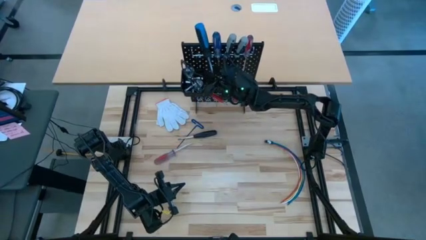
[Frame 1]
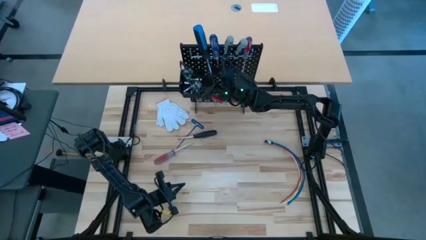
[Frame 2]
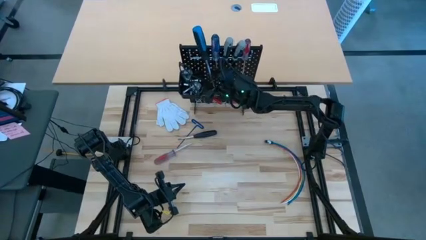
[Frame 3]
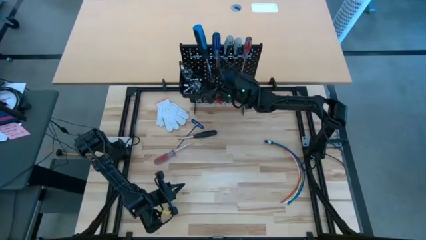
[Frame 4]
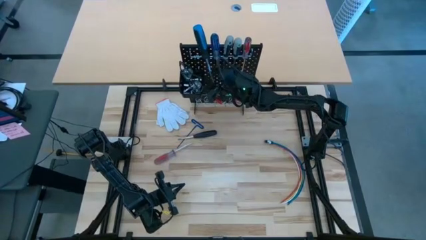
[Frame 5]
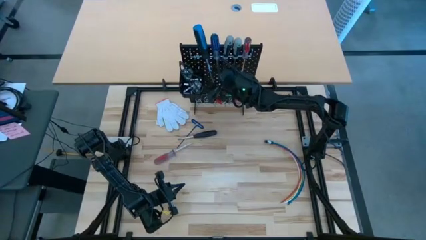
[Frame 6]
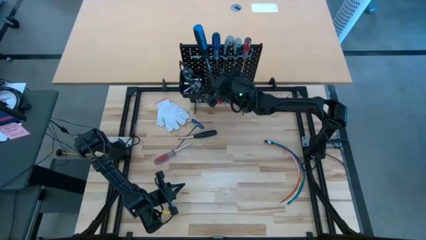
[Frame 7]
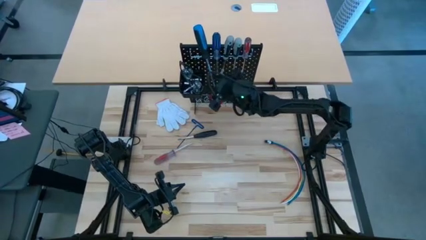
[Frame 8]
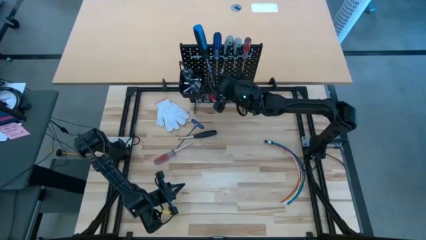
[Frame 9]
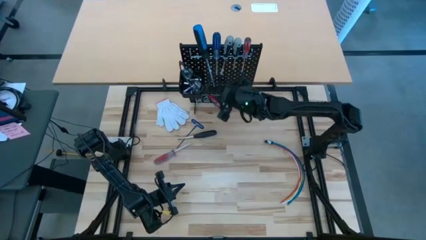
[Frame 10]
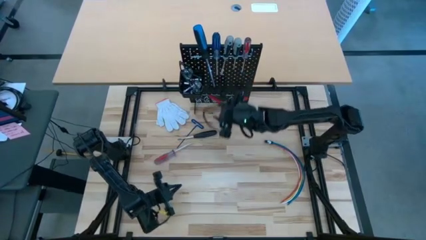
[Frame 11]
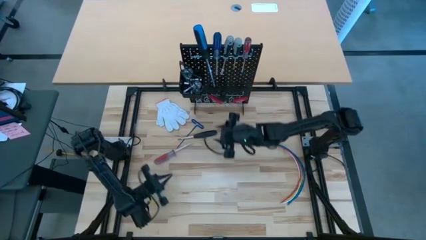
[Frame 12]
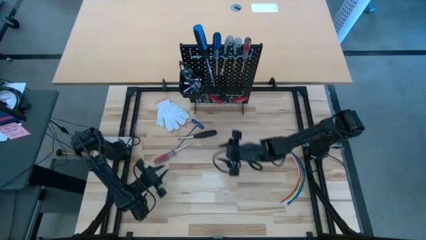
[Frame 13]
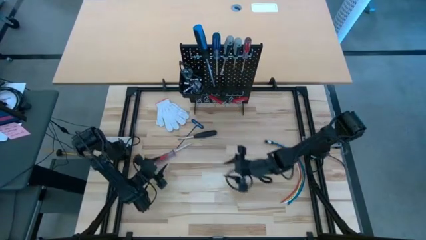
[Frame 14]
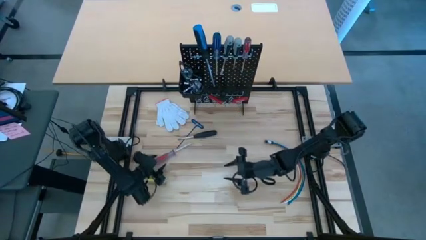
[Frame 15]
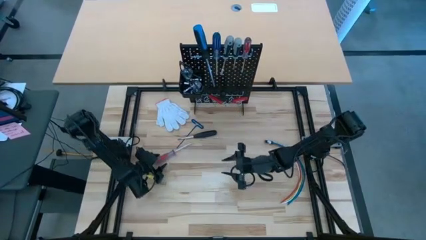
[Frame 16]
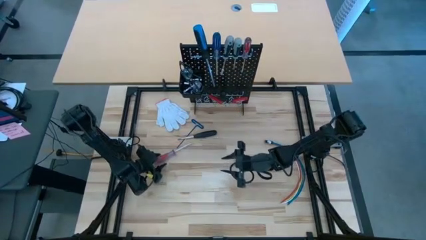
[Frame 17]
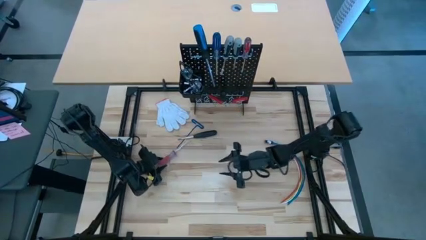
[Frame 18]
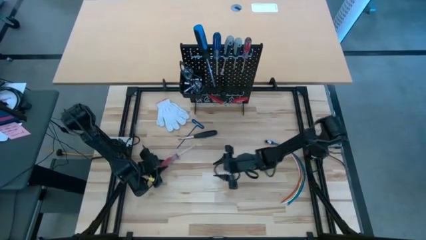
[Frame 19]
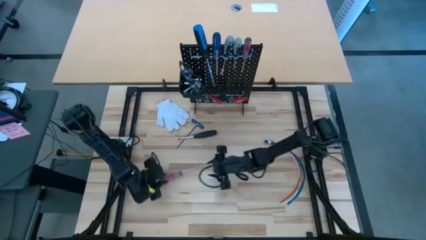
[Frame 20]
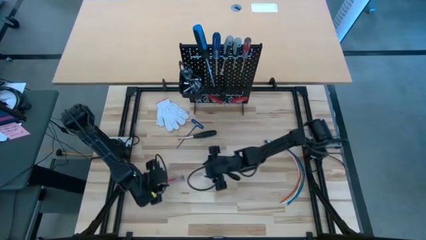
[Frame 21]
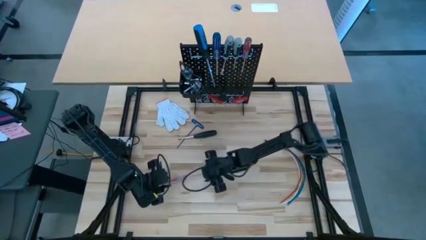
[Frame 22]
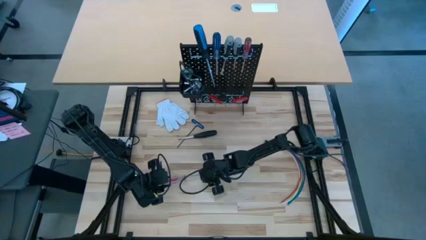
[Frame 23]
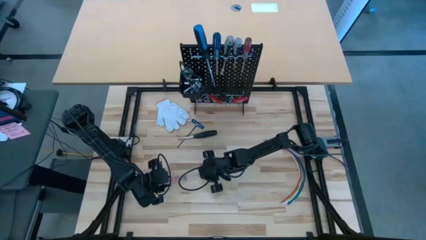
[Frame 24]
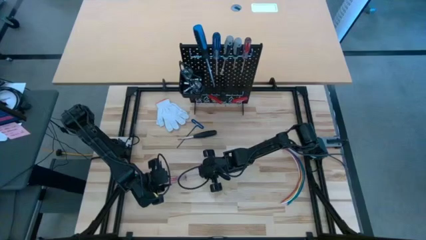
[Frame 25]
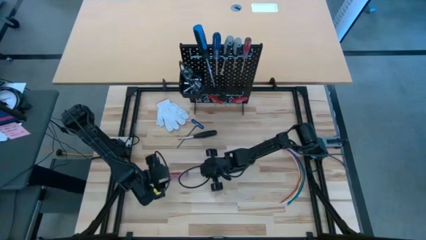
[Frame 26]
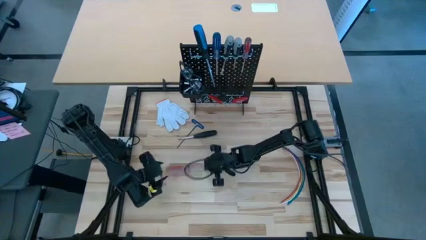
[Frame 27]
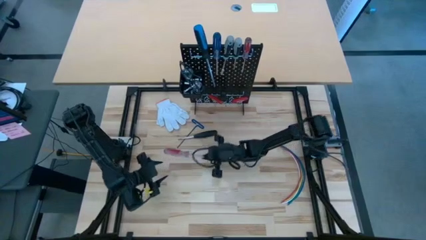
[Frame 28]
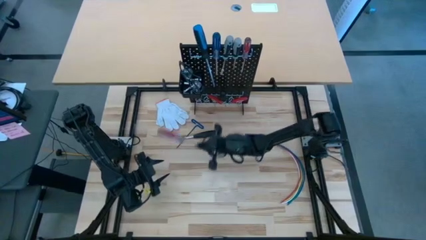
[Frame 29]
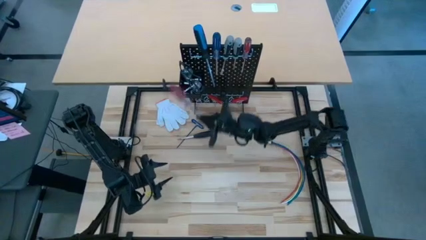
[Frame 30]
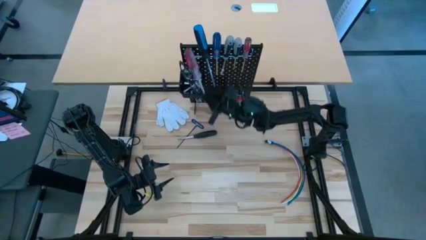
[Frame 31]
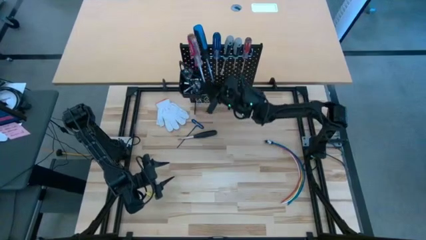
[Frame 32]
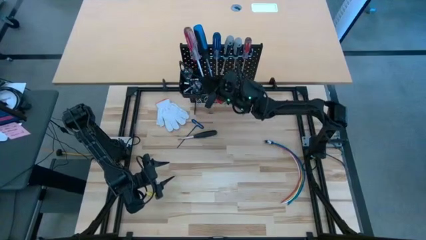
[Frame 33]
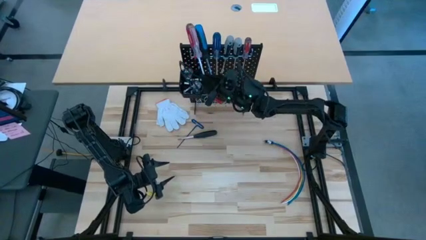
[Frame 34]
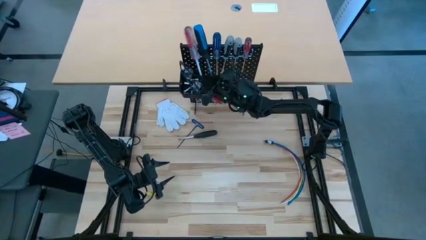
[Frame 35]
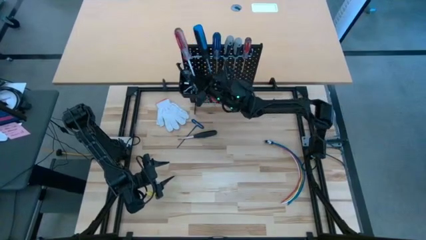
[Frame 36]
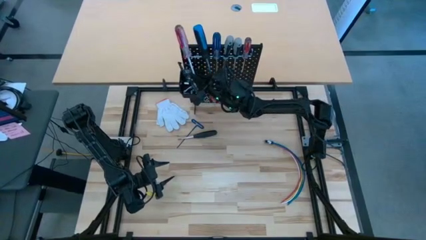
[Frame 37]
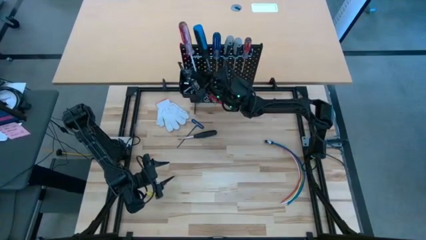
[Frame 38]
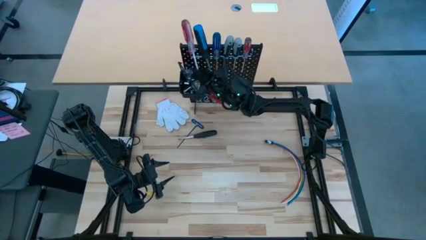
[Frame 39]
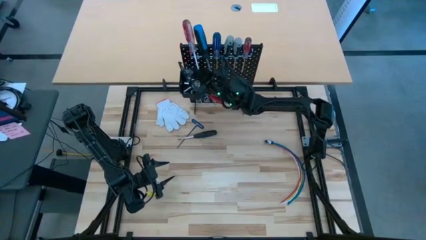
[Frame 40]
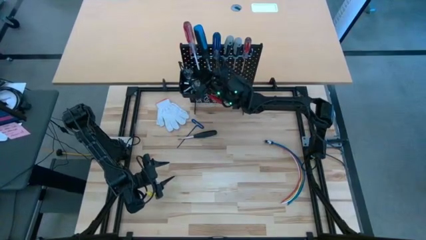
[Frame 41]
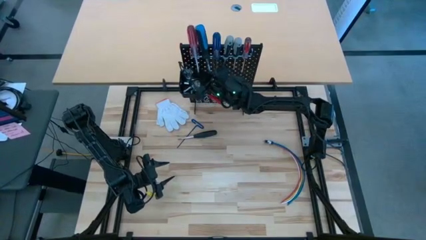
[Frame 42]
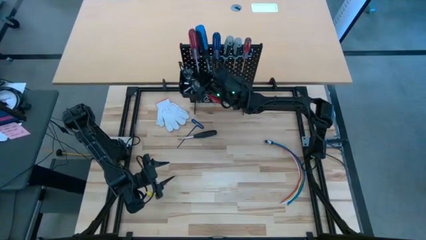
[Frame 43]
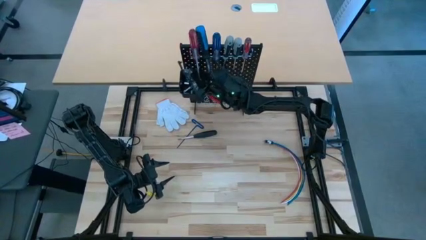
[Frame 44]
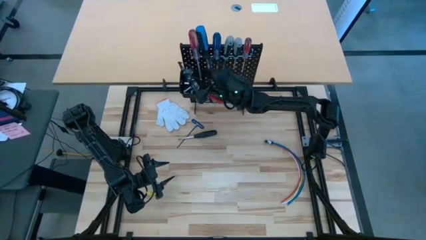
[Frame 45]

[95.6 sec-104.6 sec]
Task: Hang tools onto peg board
Hang the transparent red screwdriver in the peg board

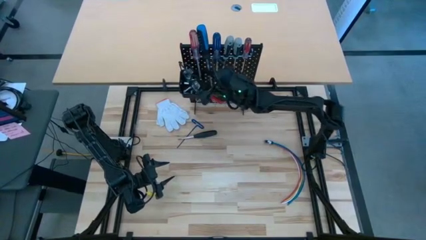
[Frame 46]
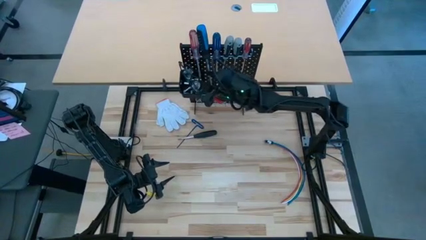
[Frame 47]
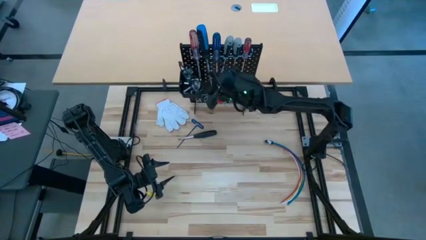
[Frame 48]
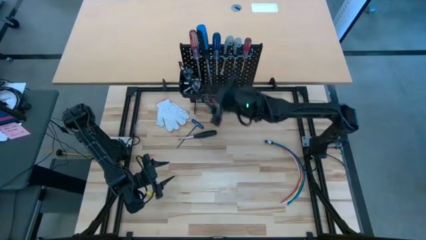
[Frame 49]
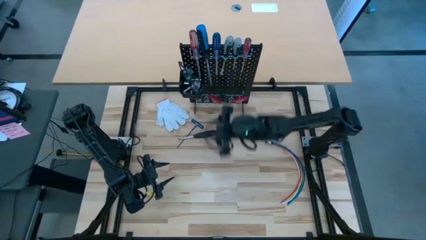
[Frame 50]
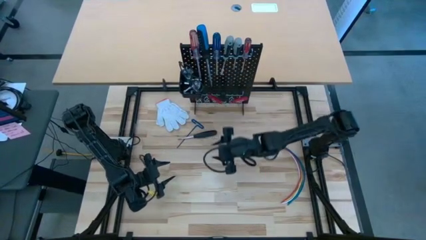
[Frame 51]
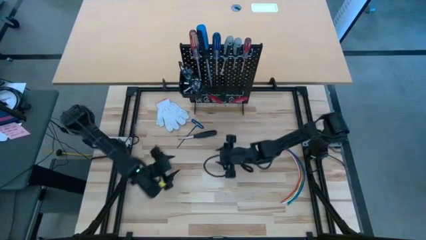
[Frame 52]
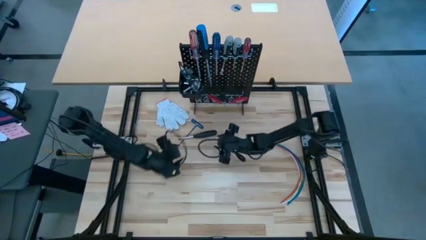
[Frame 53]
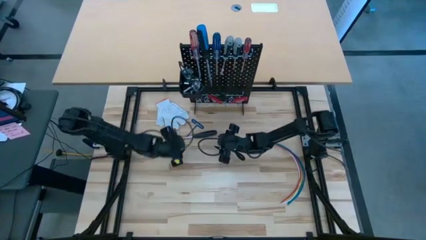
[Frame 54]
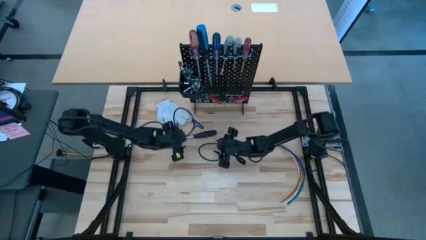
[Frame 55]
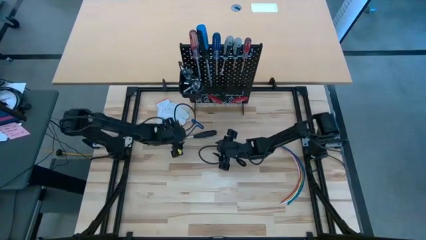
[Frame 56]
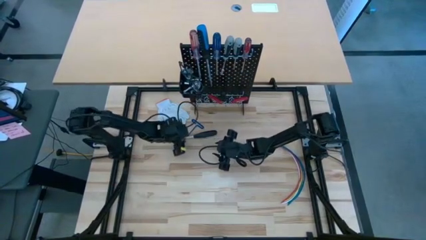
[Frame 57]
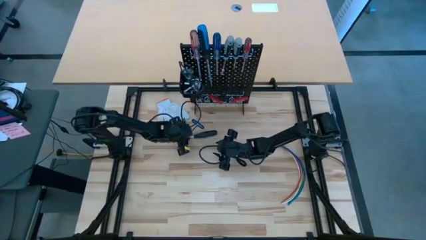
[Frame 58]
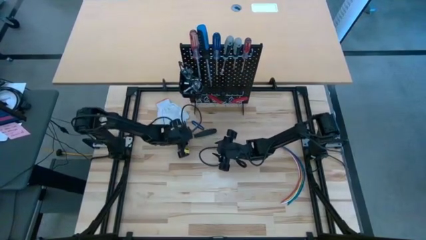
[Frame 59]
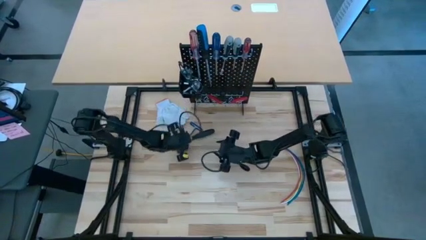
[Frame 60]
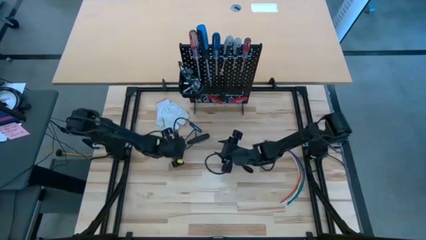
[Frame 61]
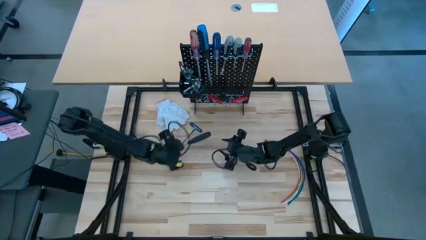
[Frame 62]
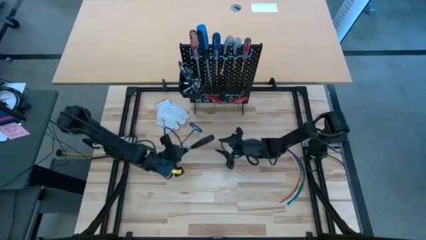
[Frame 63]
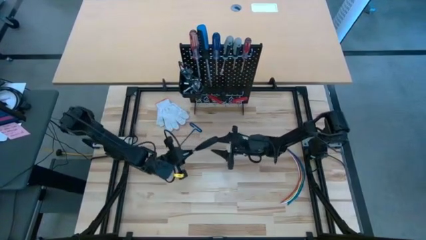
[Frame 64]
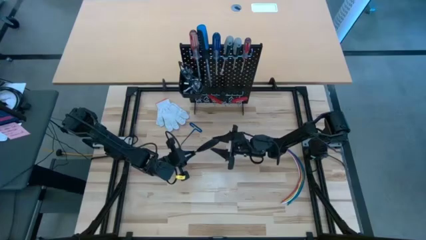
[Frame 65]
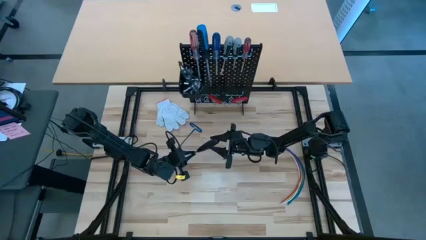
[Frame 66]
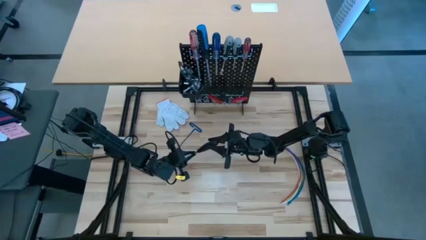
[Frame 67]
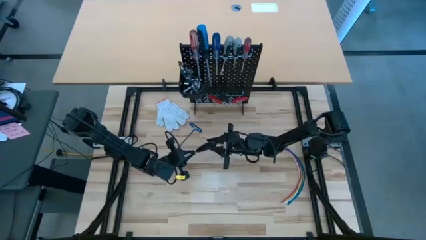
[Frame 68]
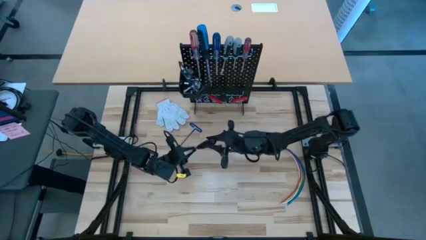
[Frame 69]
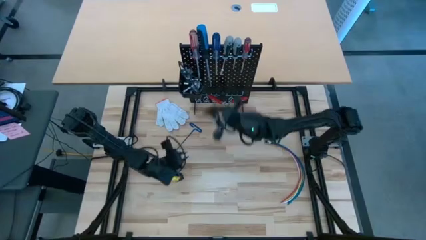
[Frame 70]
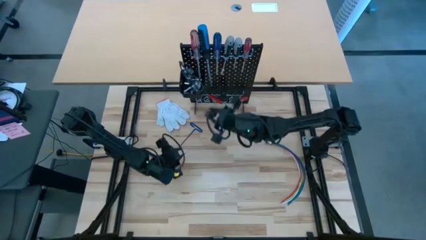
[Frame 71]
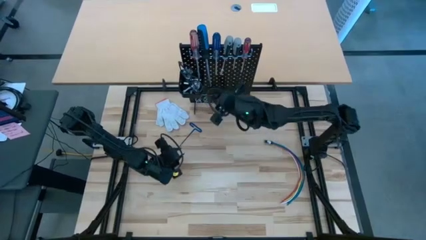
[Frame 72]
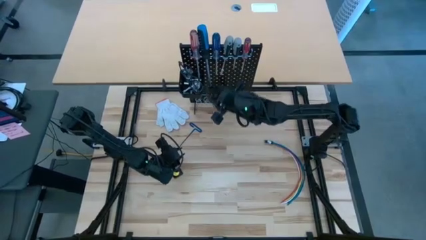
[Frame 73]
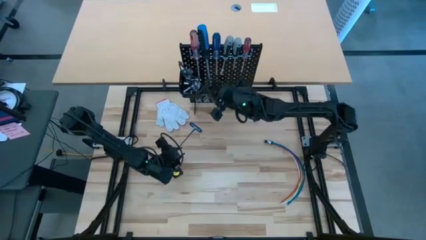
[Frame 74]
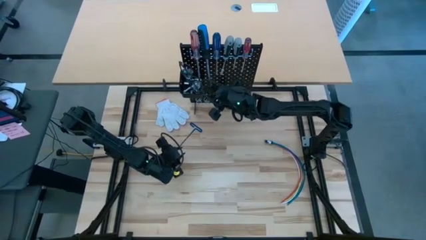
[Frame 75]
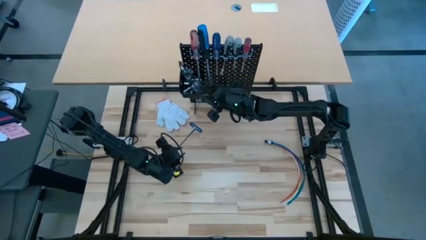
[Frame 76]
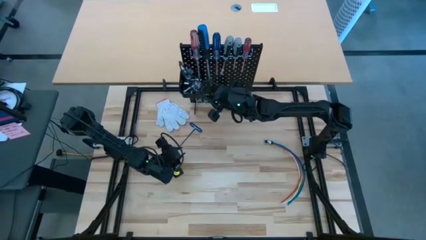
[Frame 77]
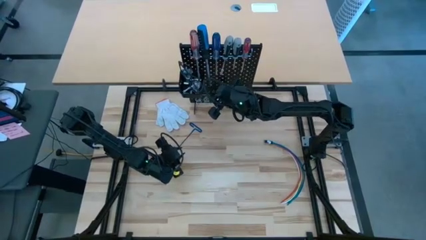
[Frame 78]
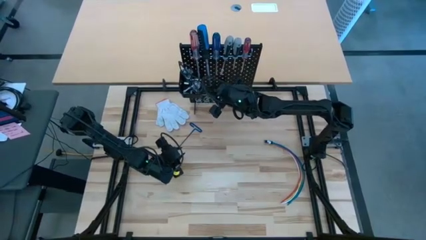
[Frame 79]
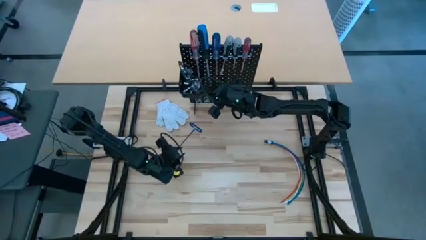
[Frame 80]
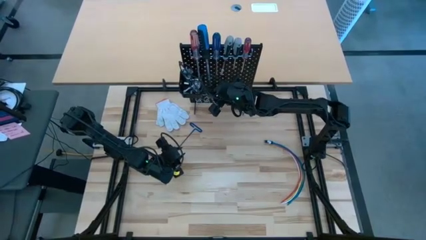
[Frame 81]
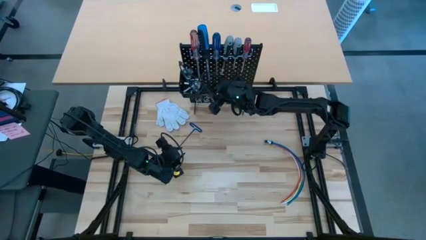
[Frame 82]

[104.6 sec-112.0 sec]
Hang the black screwdriver on the peg board
